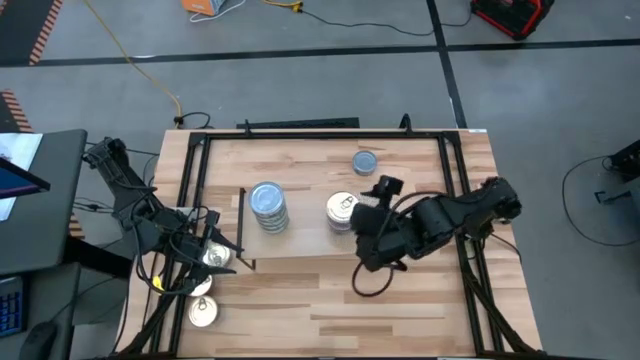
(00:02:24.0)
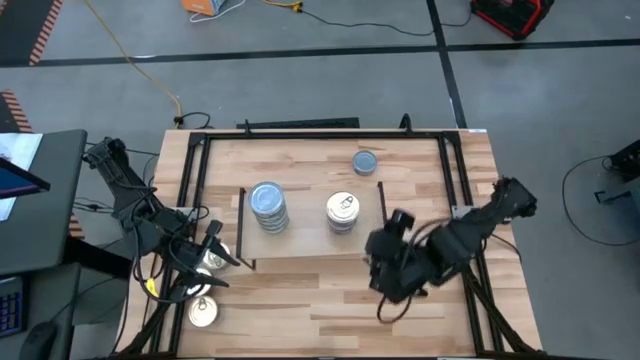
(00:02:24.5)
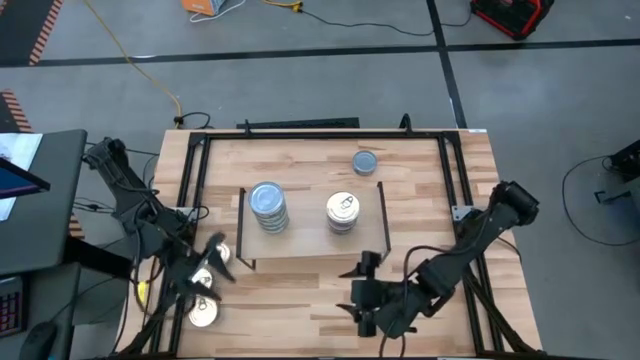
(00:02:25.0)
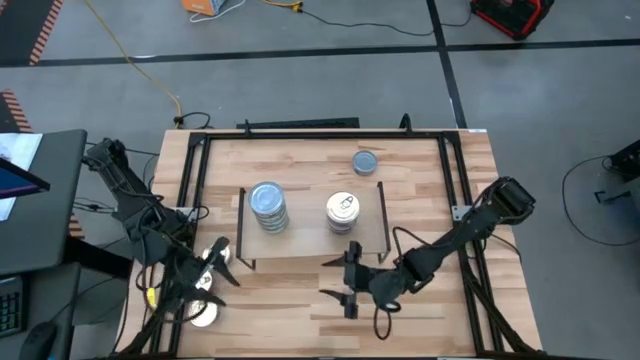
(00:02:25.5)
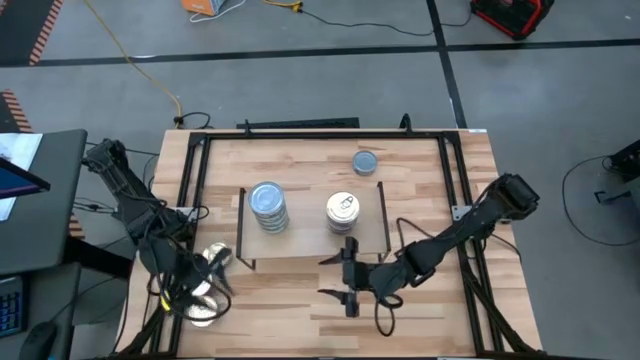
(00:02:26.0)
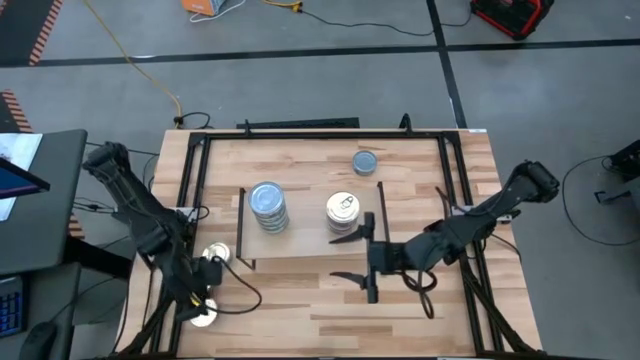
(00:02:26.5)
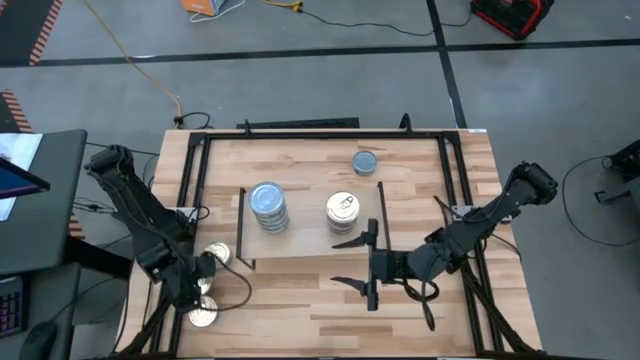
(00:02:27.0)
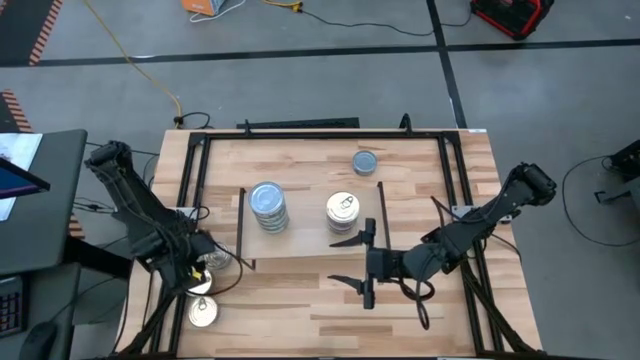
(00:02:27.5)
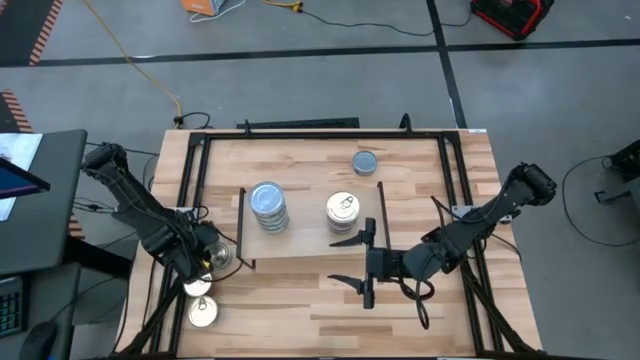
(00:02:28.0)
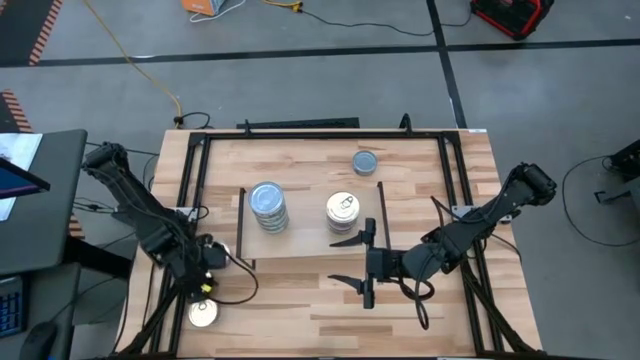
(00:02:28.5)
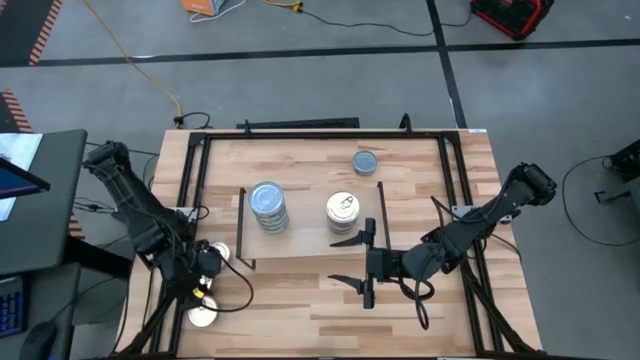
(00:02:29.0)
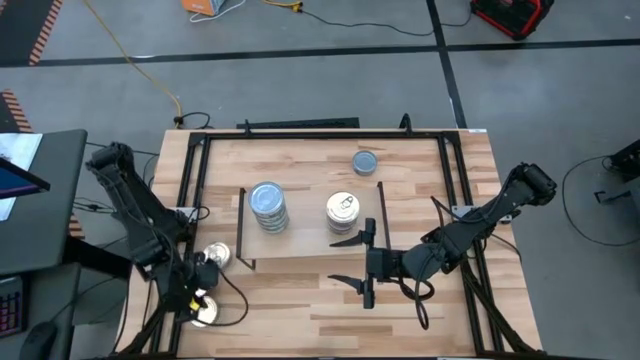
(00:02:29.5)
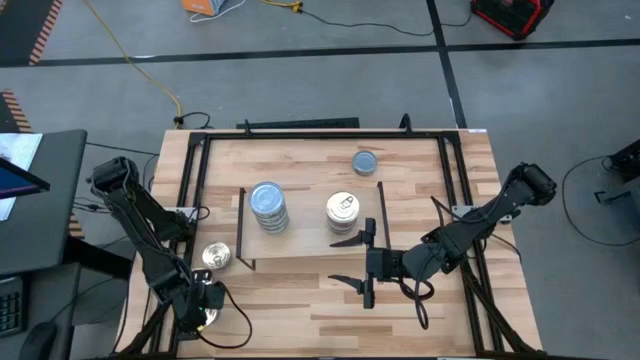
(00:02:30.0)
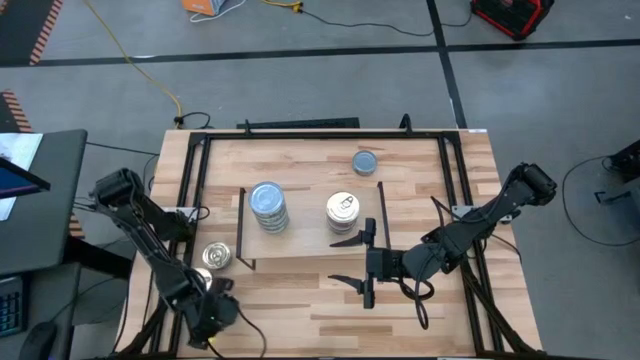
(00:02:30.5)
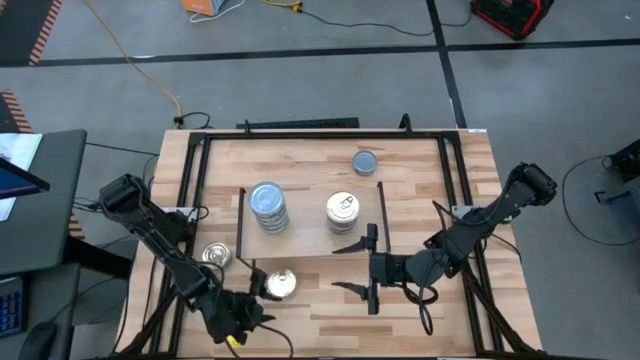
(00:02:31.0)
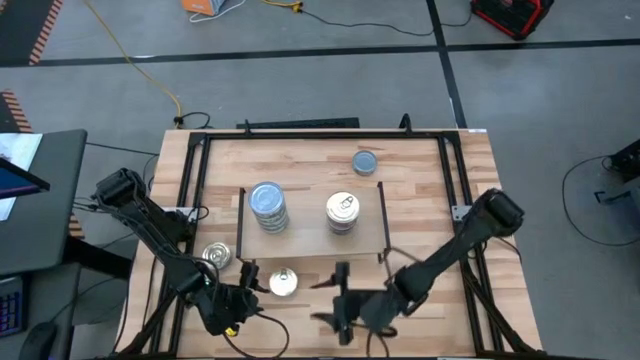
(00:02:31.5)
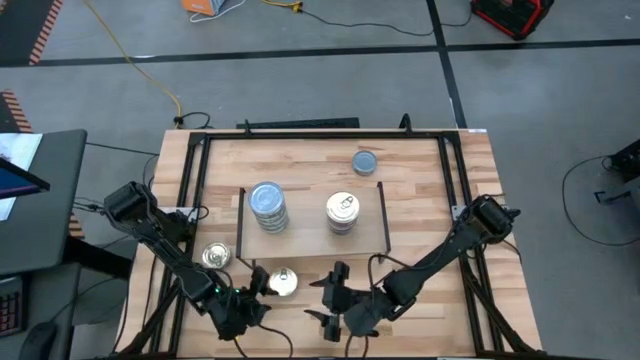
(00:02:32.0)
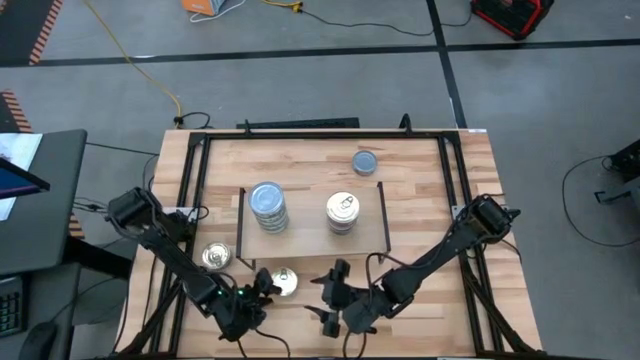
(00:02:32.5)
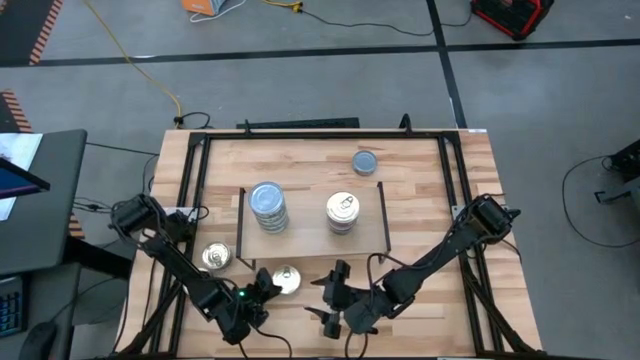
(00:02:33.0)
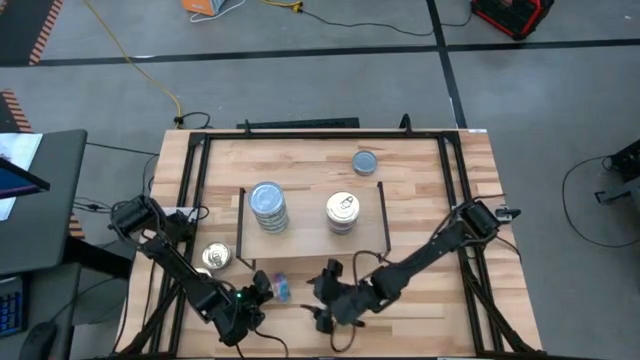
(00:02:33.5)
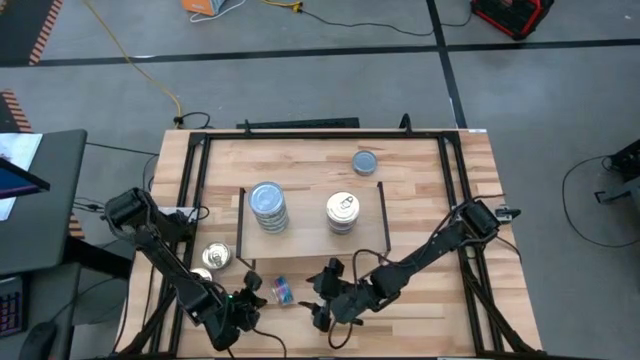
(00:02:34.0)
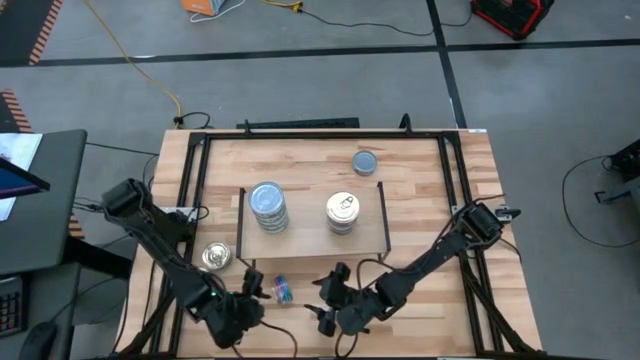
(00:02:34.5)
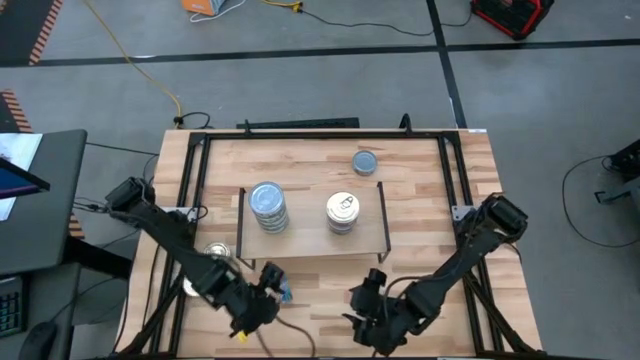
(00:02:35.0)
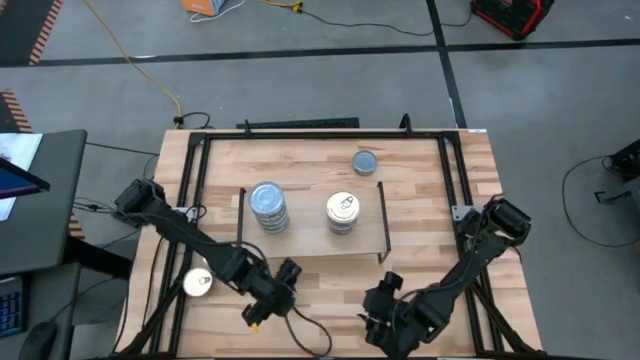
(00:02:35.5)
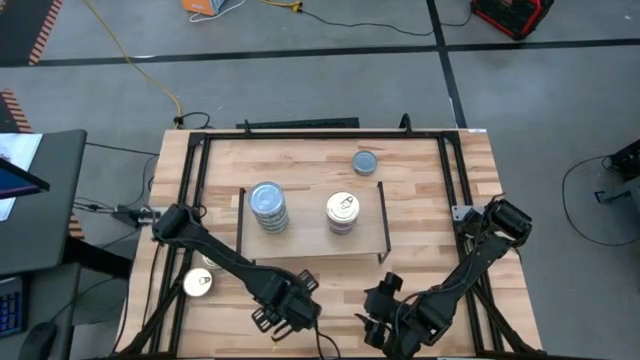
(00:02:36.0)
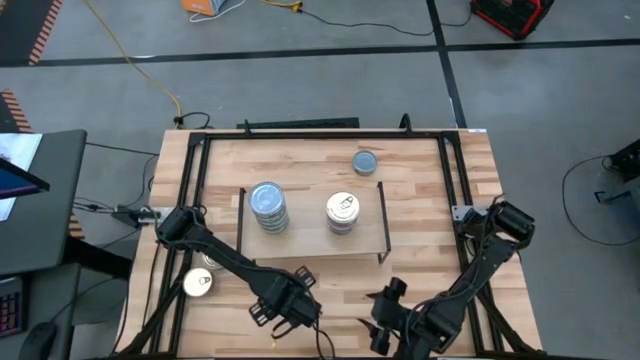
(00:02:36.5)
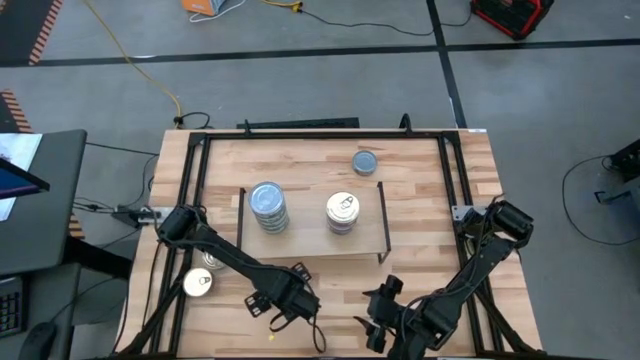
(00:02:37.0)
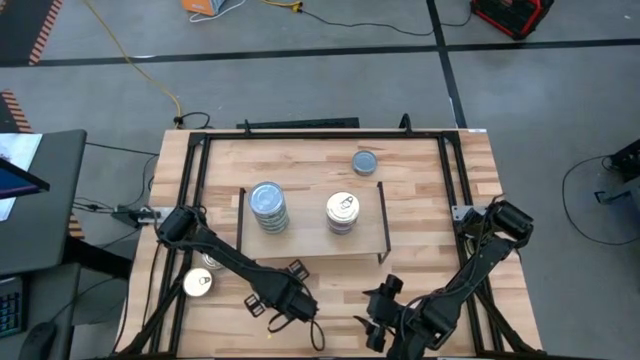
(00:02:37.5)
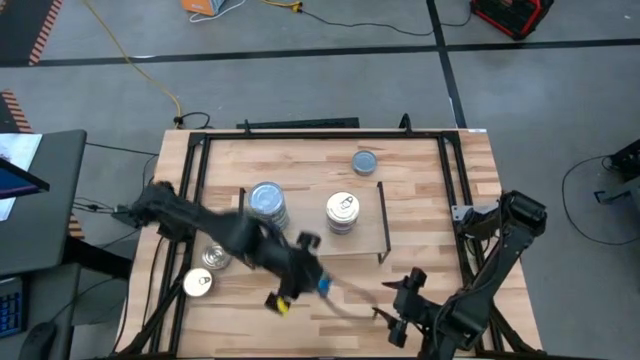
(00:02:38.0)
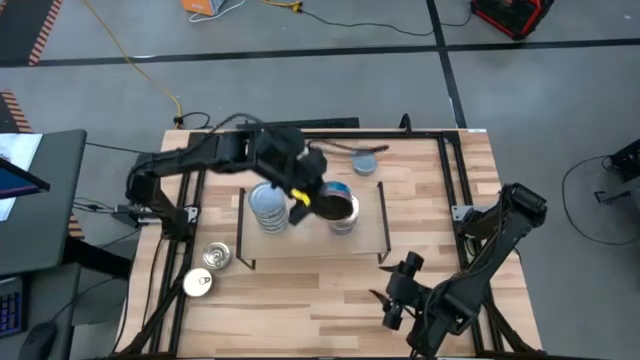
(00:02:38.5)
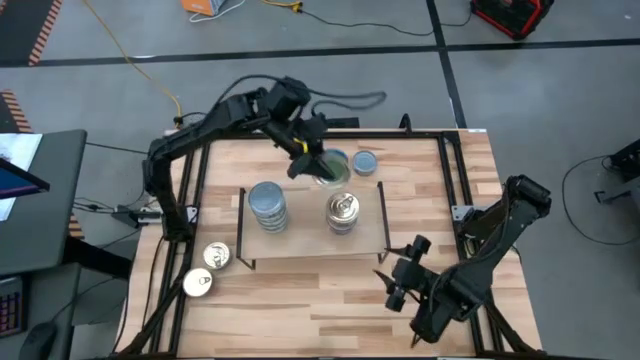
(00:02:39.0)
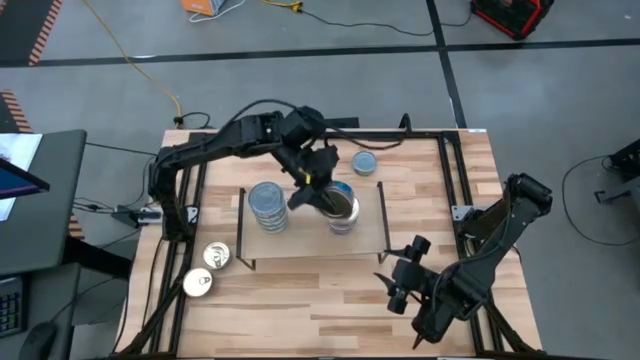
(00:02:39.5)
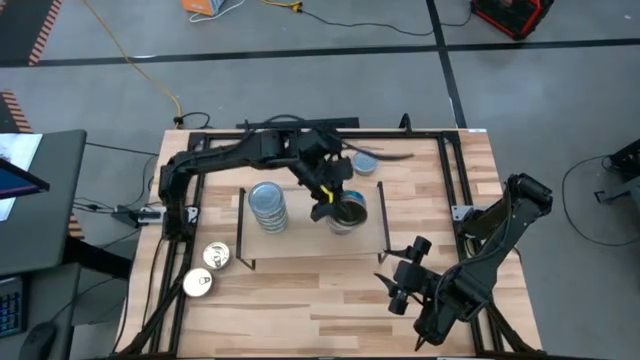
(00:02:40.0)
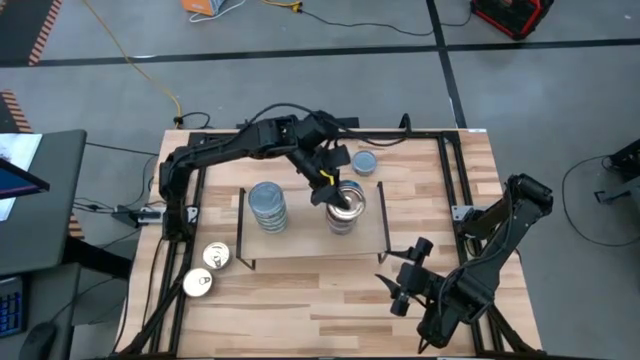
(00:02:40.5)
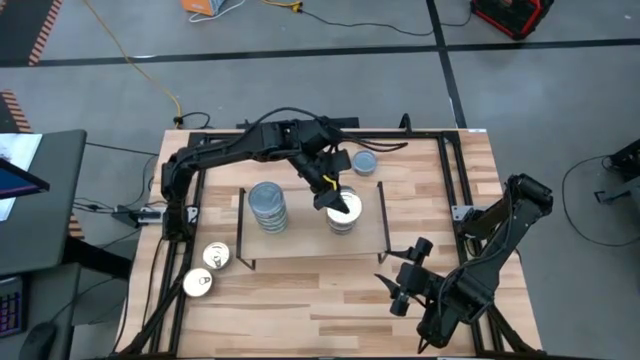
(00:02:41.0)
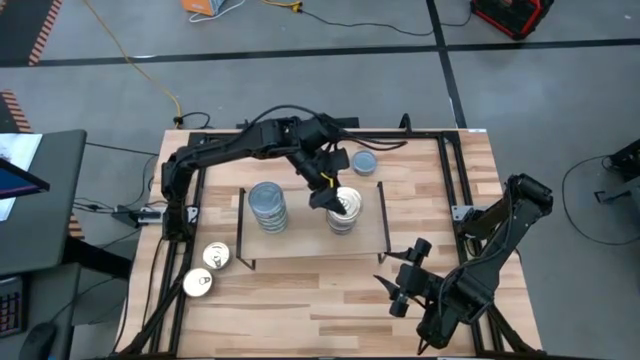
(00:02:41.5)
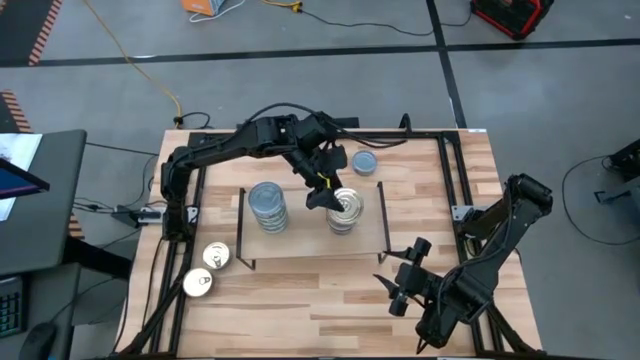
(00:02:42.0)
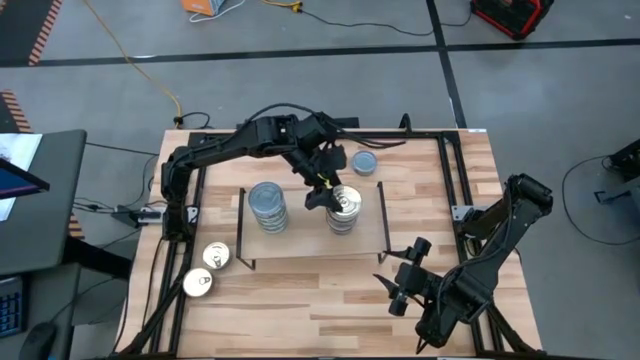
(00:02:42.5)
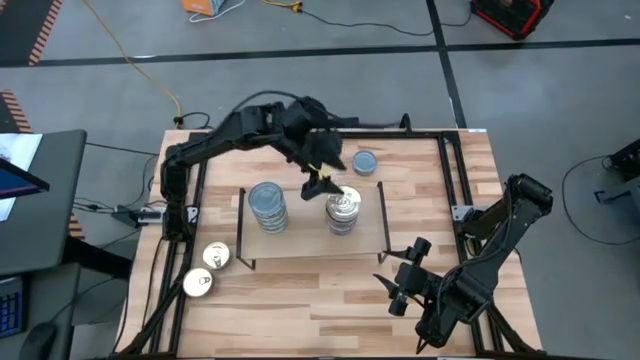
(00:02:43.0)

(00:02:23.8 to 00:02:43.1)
Task: Stack canned seafood by type on shelf
Stack the blue tuna can on top of the blue tuna can on the shelf
